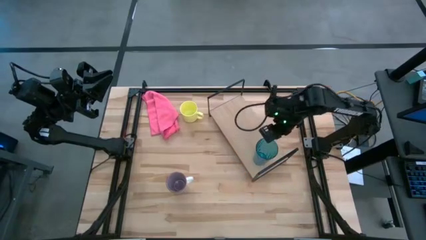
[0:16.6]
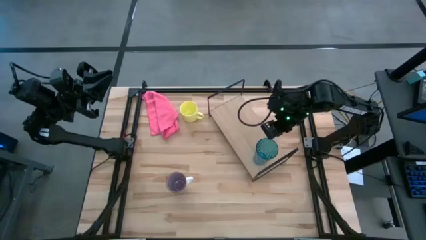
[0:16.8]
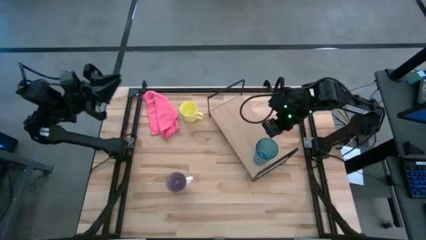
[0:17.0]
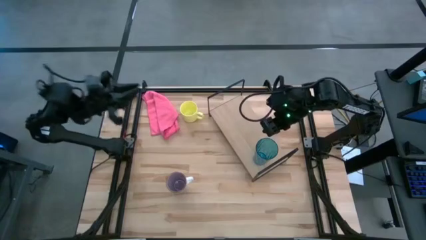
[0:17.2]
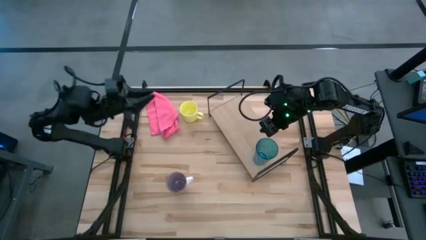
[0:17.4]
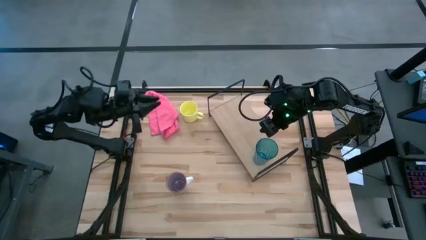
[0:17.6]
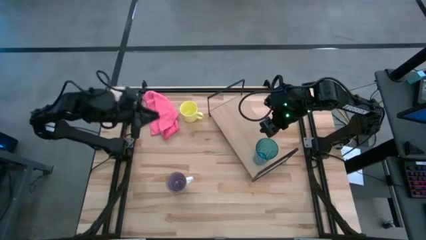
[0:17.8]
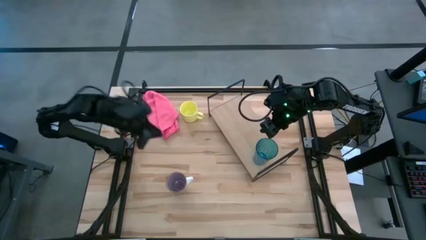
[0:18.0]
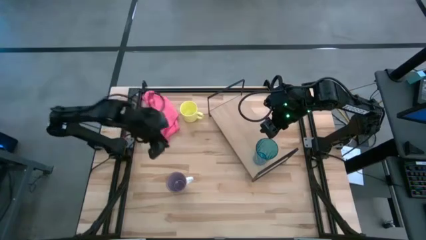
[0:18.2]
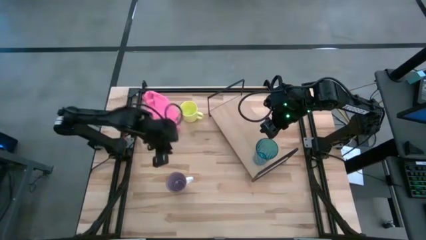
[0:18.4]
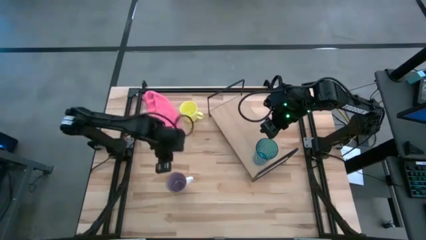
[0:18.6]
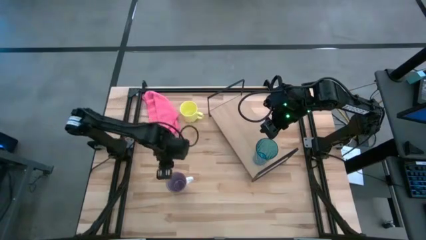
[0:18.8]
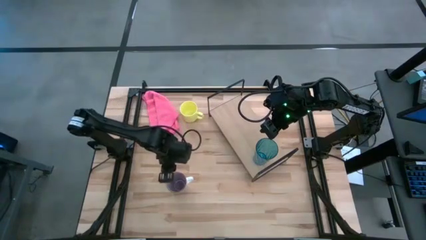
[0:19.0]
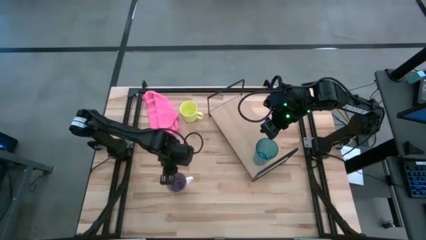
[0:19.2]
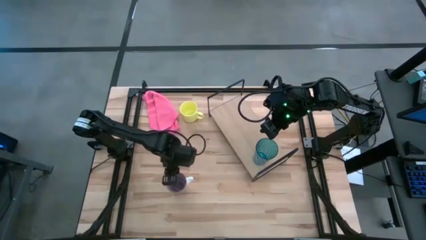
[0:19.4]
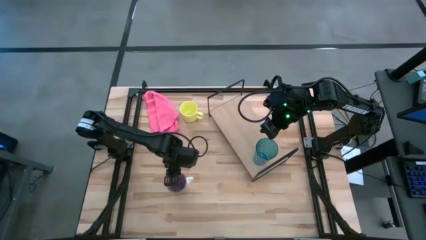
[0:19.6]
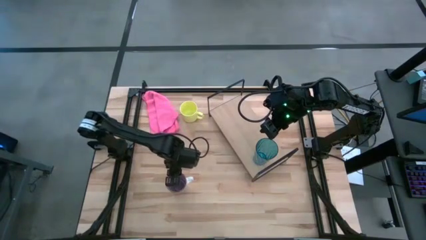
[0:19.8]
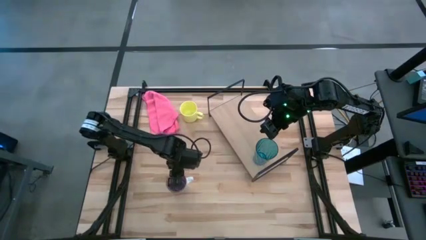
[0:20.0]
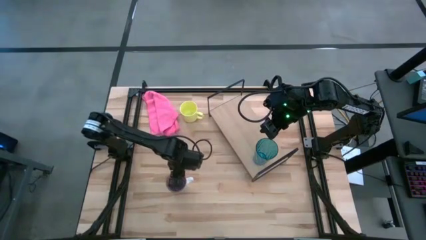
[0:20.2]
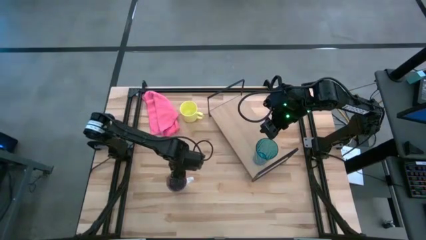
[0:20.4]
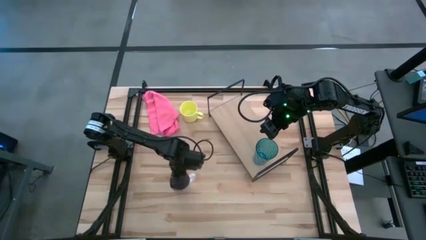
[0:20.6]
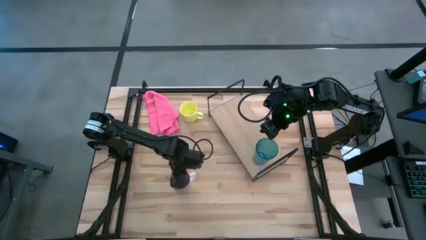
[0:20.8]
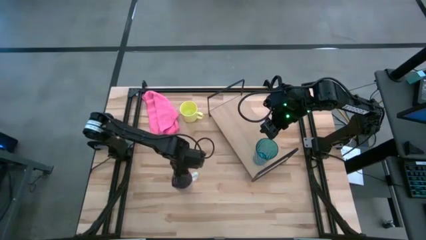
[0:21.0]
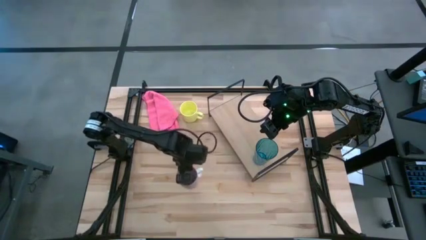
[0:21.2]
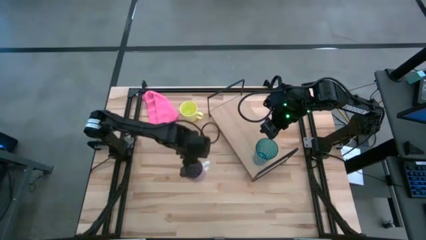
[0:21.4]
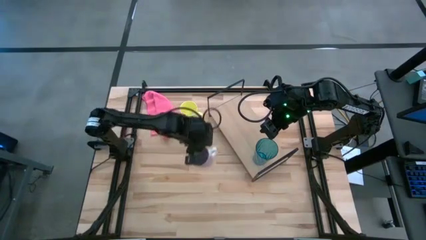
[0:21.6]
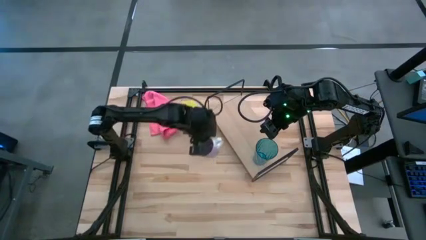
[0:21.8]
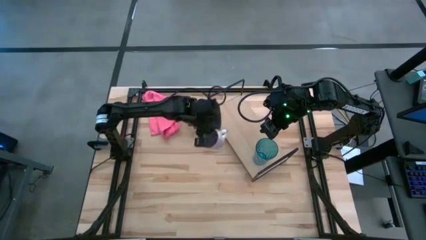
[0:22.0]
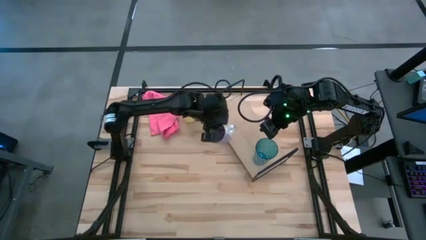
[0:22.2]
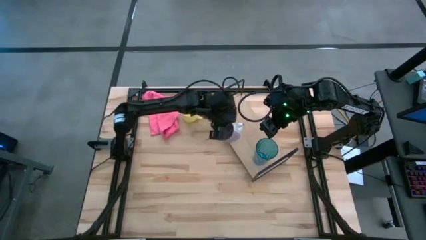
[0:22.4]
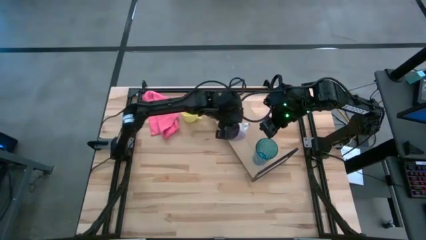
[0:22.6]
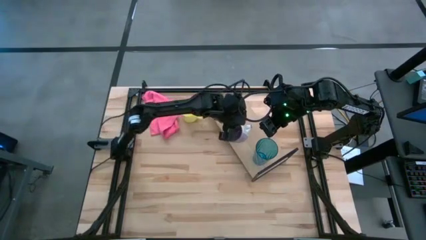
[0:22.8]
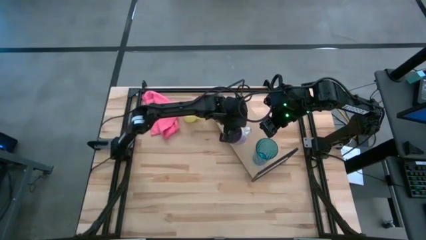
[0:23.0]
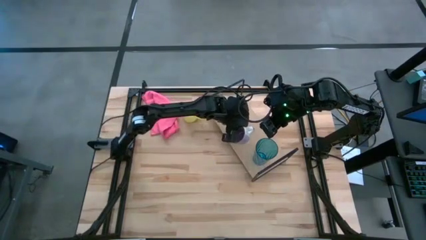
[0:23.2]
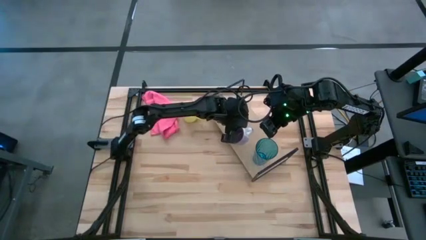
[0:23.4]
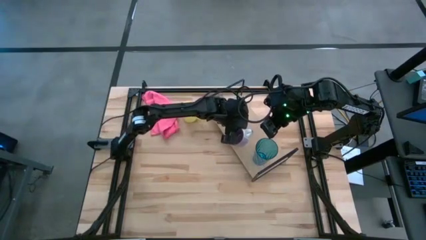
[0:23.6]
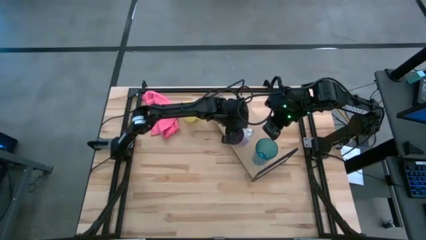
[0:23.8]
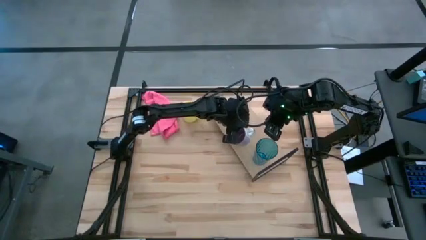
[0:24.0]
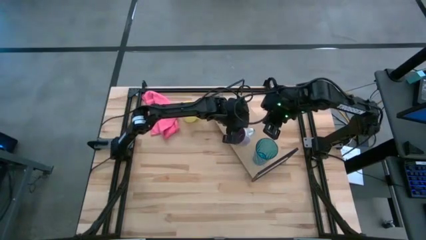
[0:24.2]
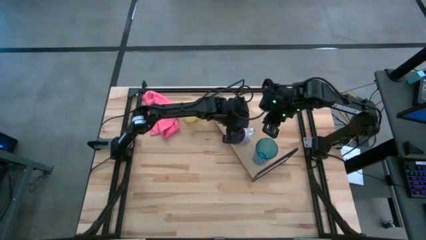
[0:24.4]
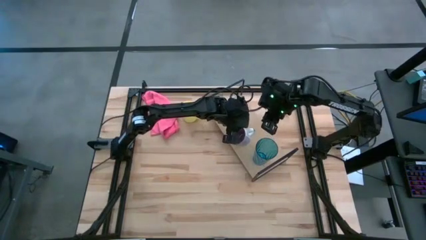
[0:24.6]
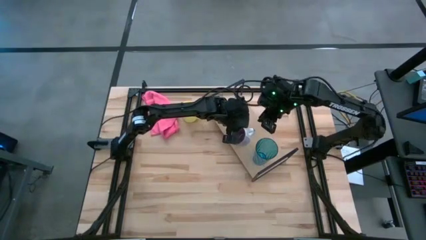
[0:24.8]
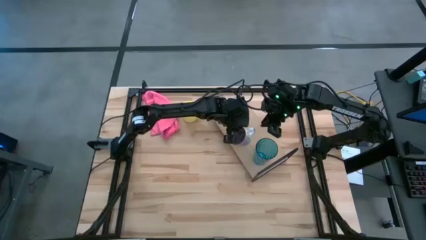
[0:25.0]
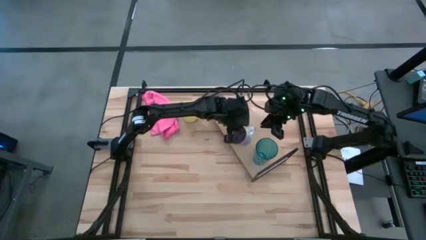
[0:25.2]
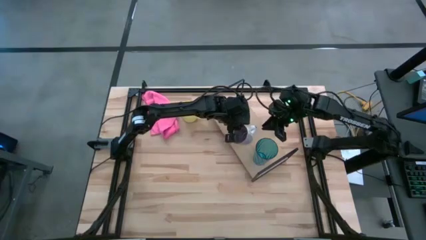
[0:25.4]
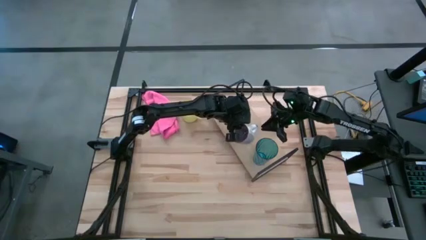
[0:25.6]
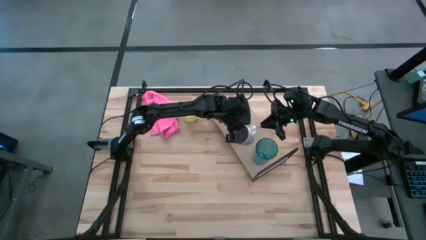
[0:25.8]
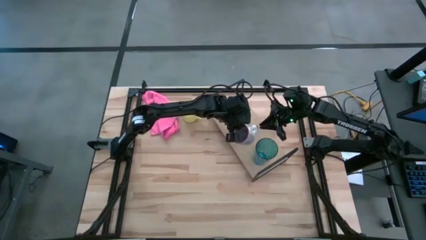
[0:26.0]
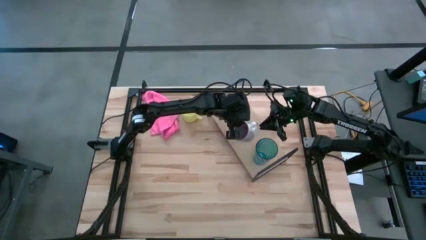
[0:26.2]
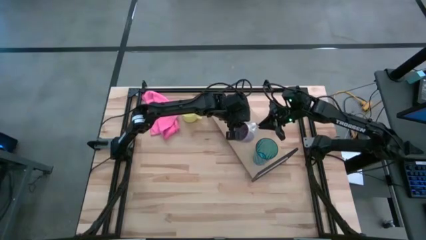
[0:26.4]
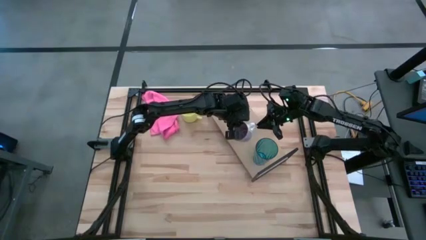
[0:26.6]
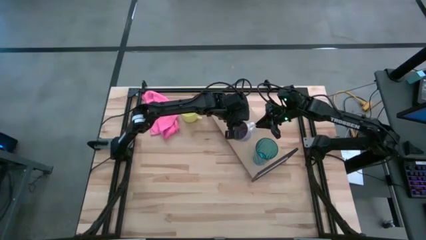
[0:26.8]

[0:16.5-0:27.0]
Task: Stack small to large cups/mugs on shelf
Put the purple mug on the shelf
